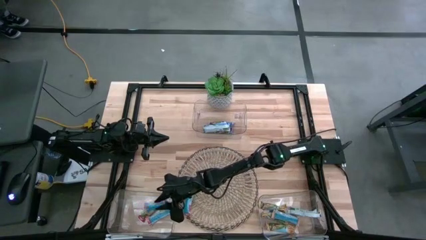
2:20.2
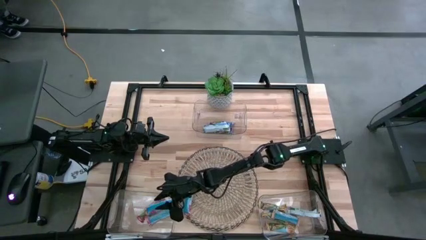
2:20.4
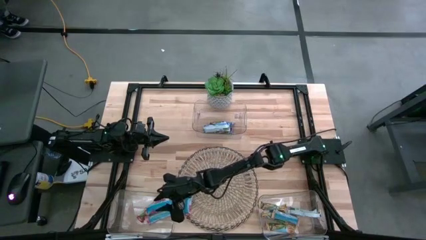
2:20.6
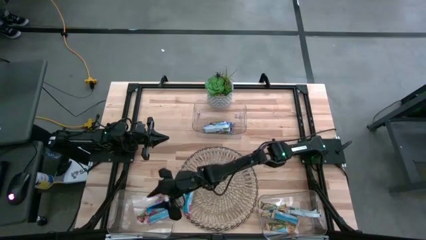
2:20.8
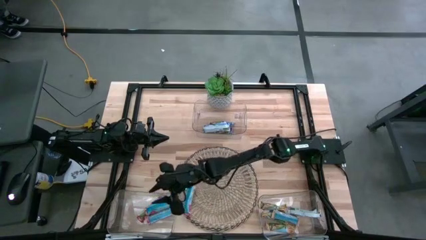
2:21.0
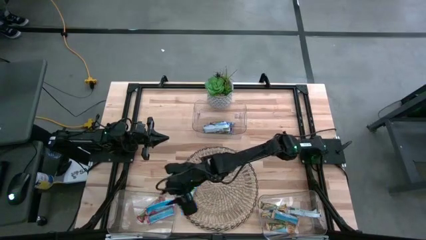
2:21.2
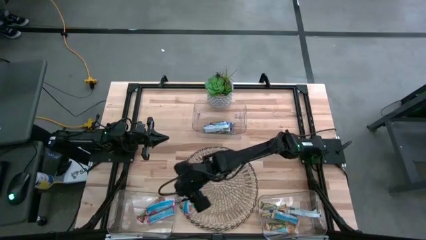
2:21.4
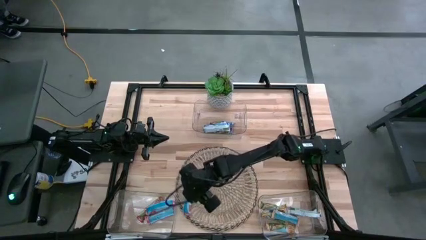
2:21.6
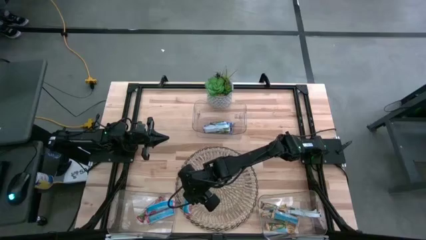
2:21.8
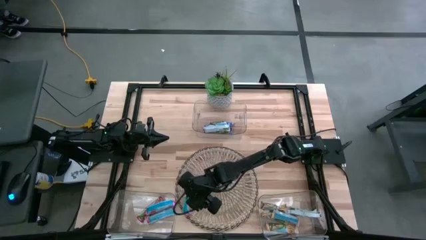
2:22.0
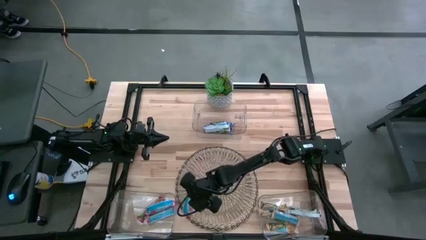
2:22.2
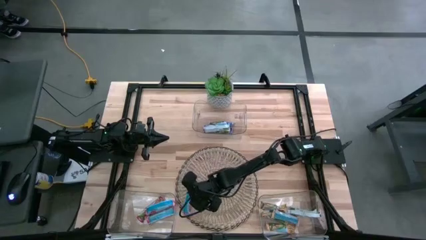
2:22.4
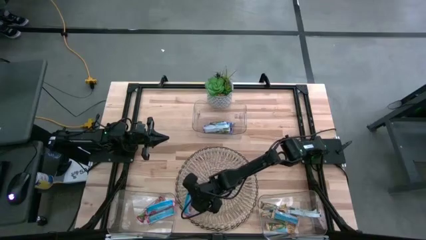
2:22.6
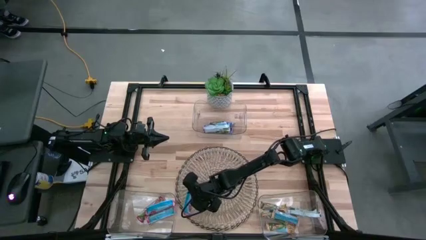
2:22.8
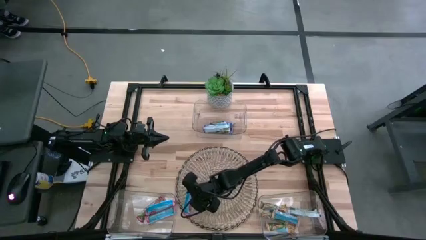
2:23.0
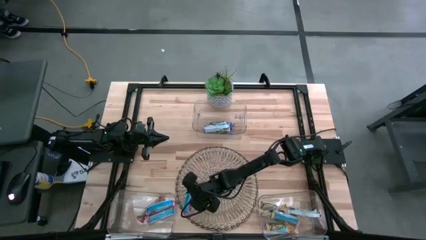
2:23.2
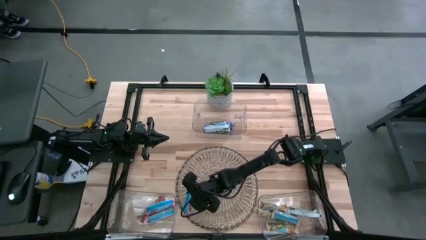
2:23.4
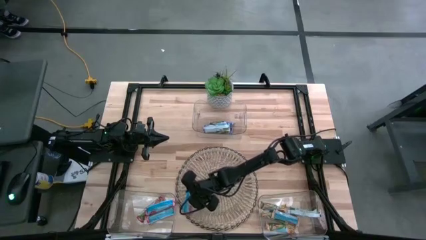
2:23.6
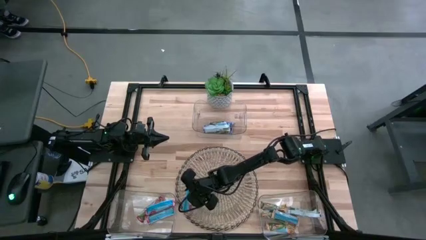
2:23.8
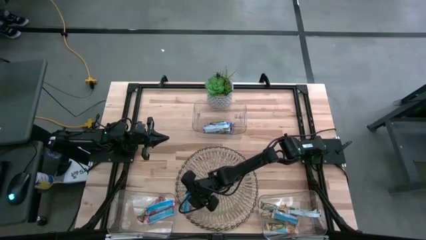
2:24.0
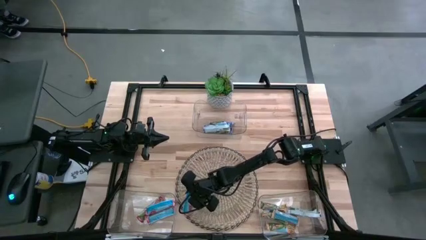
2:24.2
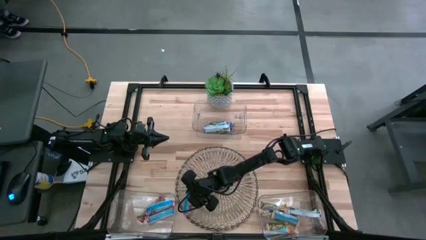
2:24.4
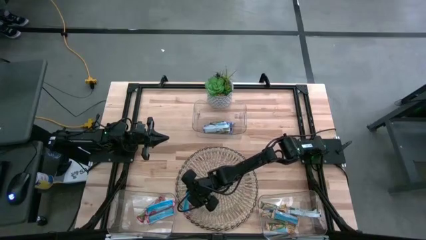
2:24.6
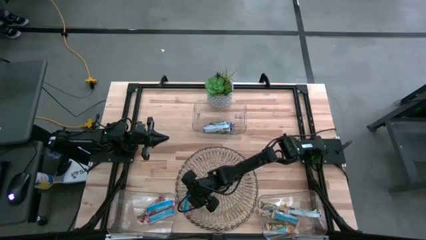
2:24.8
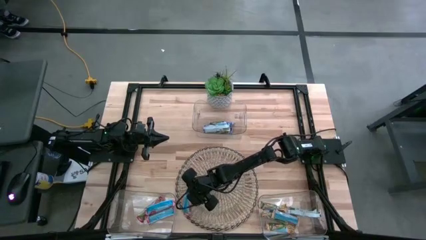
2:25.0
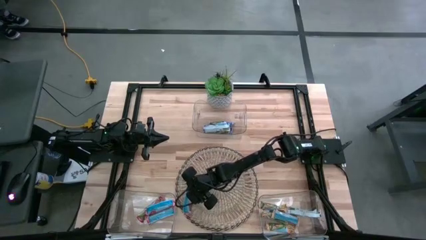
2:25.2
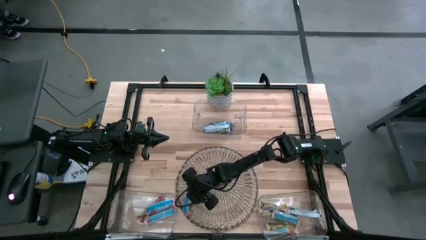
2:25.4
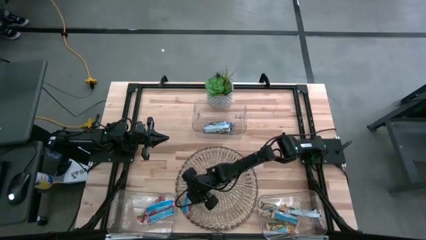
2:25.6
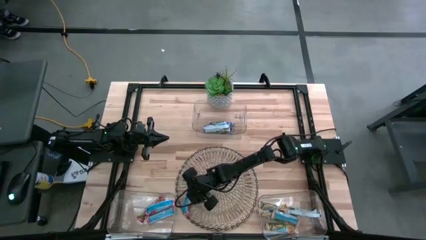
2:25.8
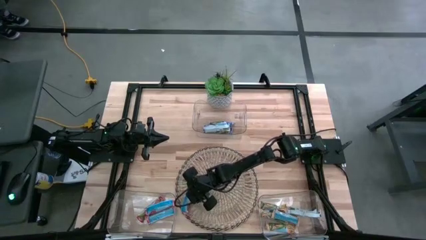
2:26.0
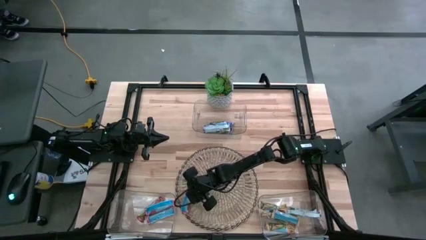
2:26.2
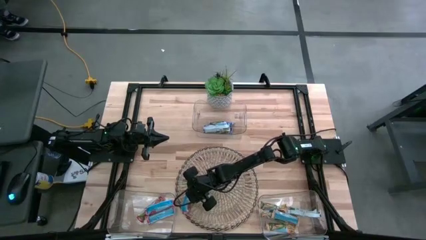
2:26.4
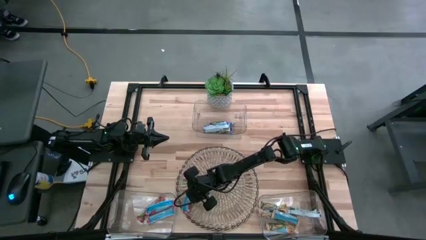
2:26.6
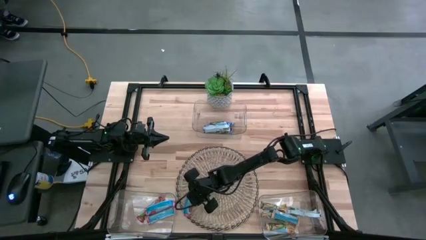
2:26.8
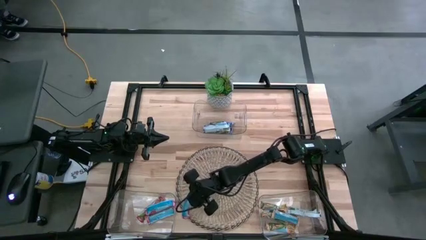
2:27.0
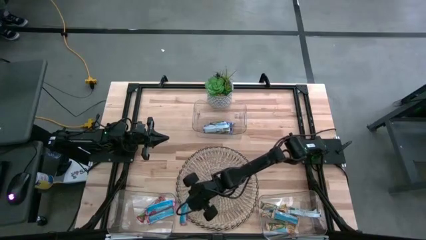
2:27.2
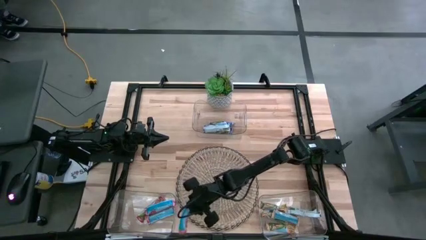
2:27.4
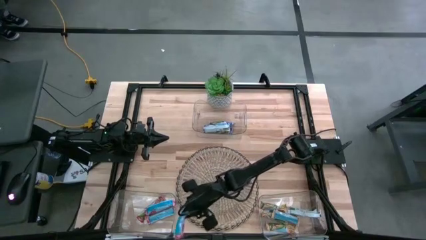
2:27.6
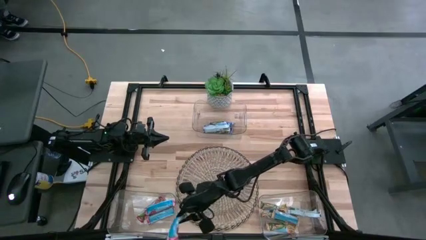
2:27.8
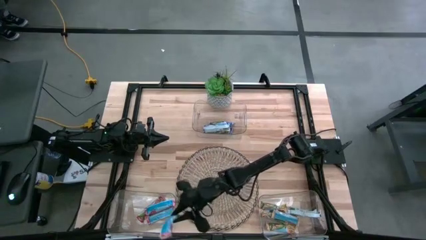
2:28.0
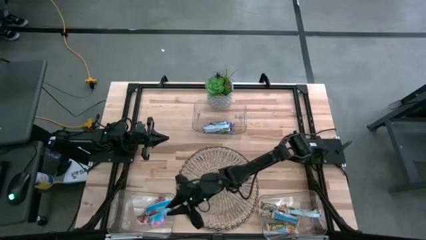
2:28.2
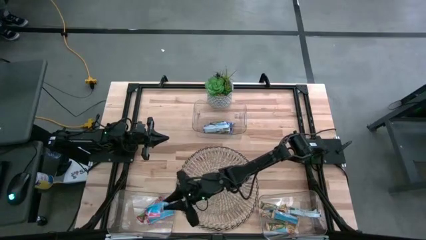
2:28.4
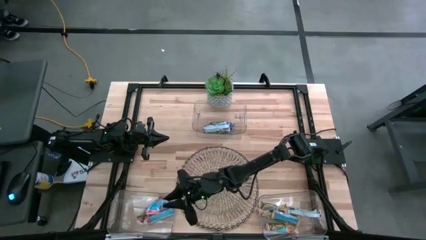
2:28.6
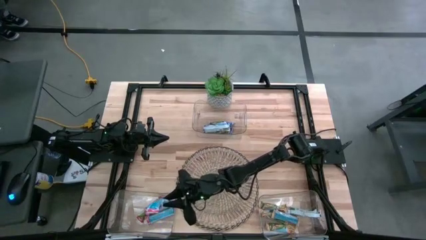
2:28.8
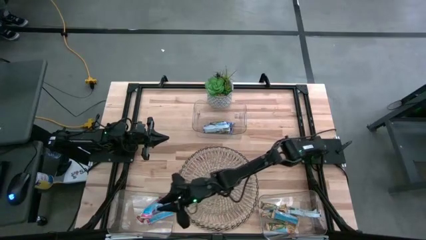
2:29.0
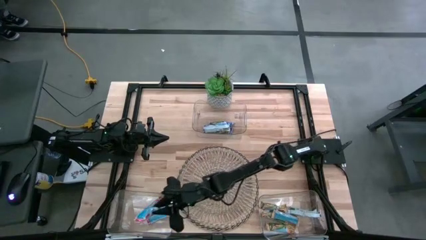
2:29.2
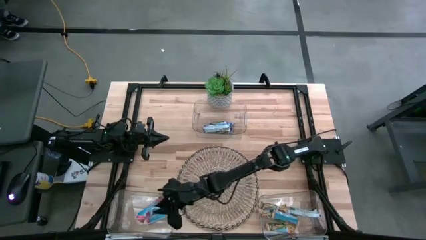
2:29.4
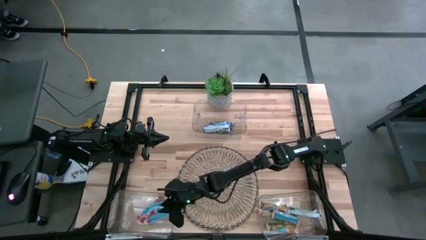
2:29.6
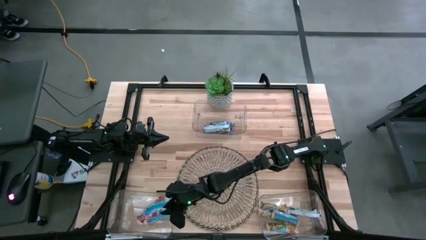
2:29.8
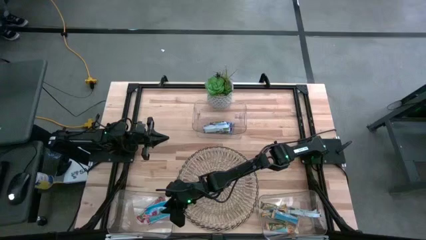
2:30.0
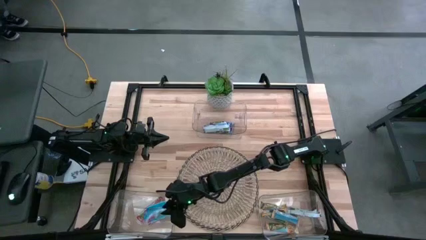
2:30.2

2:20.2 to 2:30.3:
Task: Pick and place Granola Bars by type
Put the red granola bar into the bottom left transparent bin

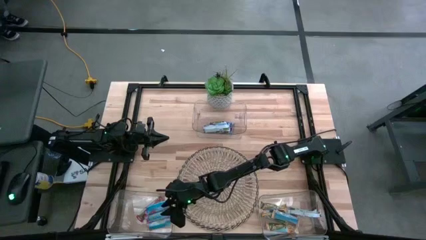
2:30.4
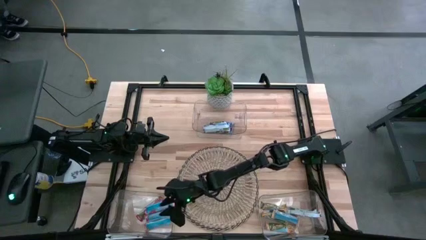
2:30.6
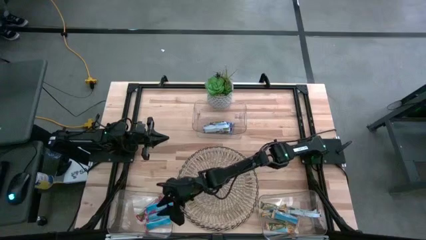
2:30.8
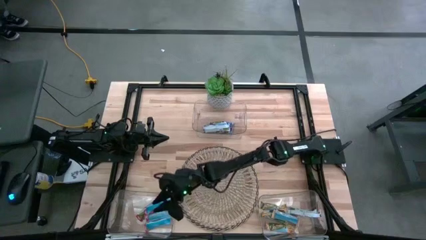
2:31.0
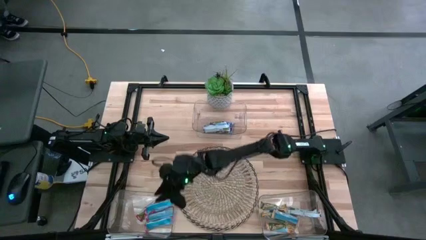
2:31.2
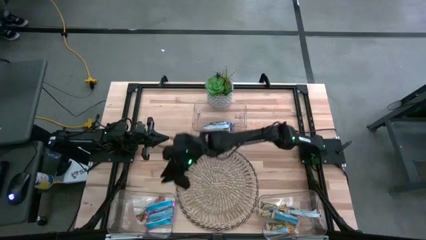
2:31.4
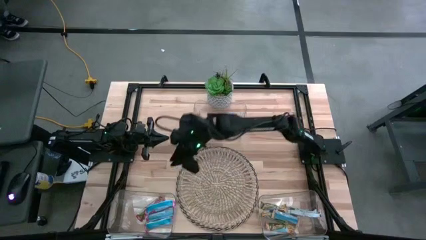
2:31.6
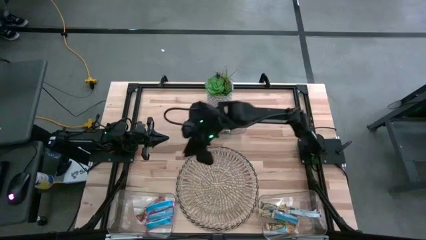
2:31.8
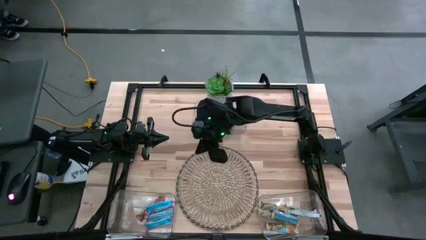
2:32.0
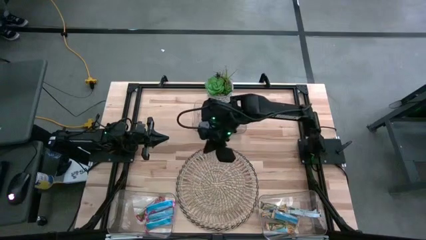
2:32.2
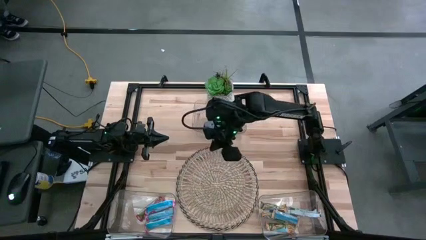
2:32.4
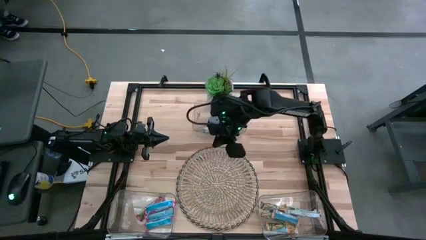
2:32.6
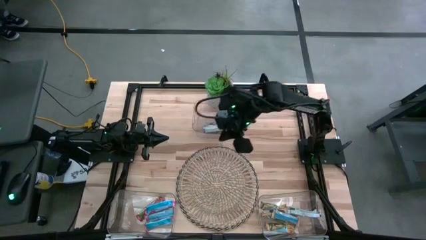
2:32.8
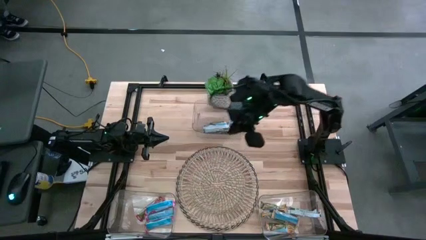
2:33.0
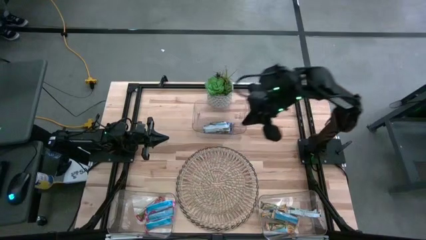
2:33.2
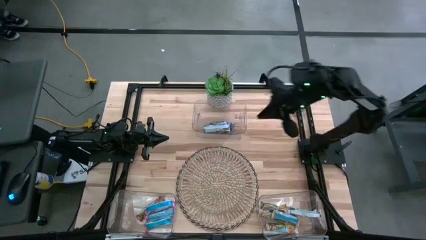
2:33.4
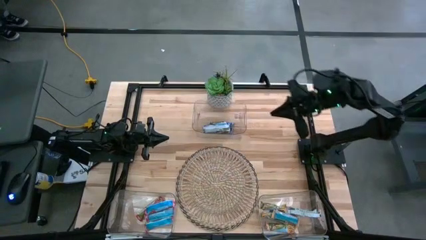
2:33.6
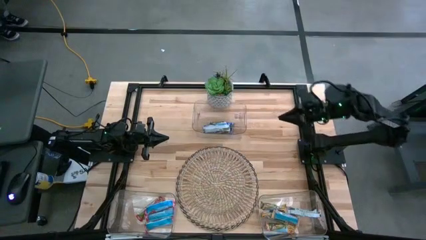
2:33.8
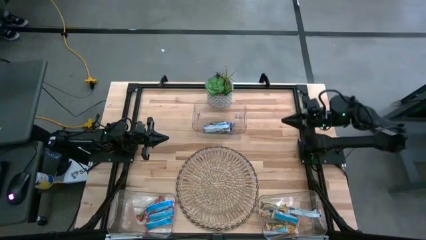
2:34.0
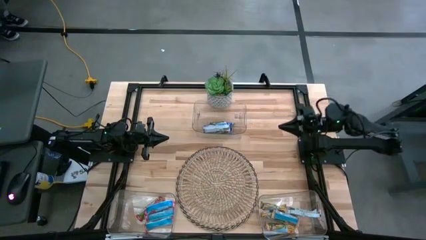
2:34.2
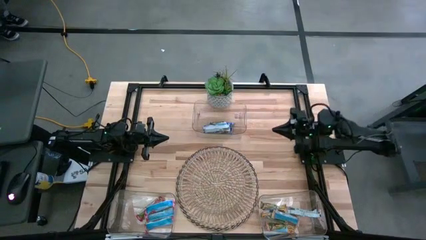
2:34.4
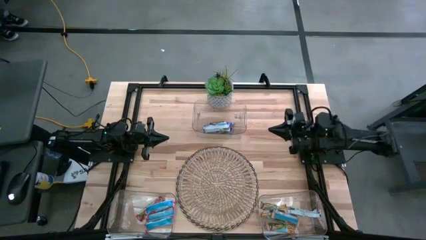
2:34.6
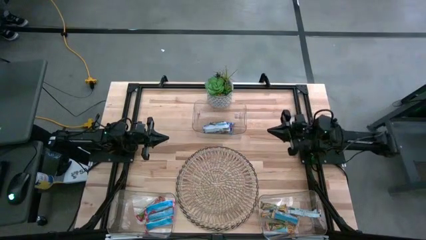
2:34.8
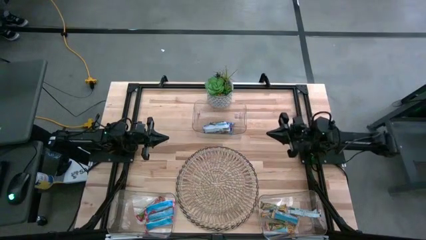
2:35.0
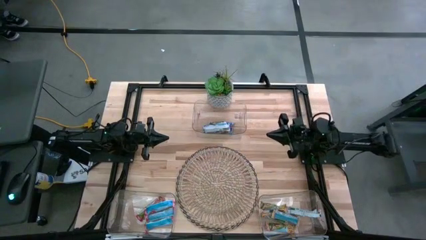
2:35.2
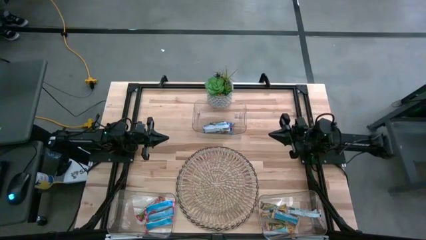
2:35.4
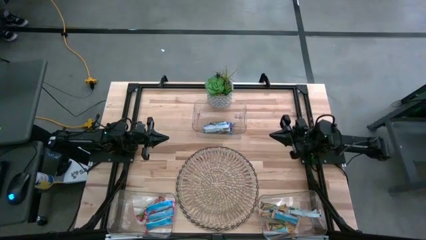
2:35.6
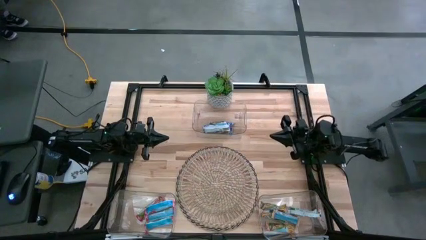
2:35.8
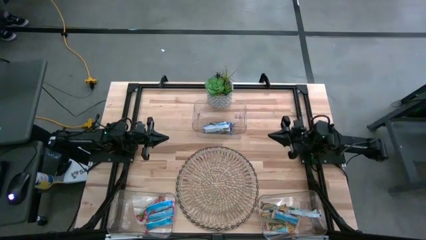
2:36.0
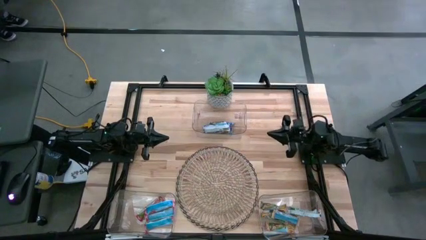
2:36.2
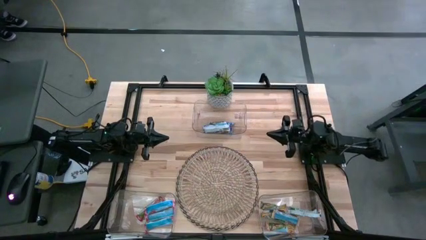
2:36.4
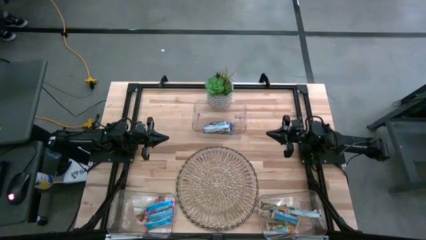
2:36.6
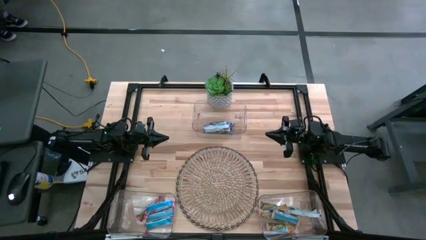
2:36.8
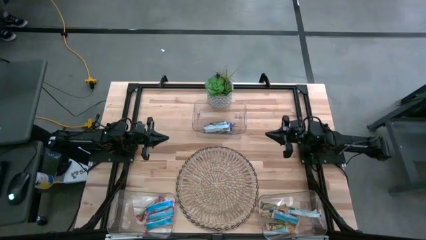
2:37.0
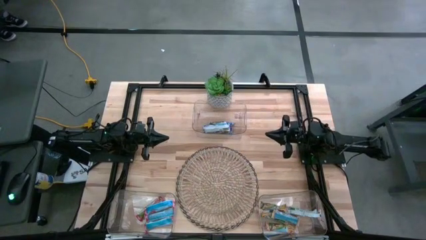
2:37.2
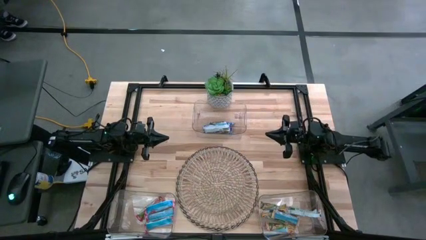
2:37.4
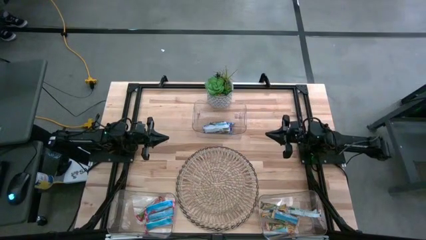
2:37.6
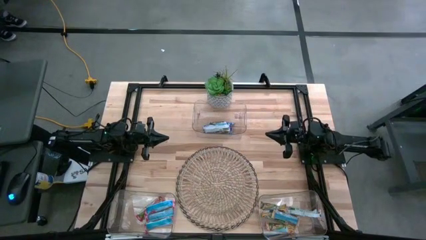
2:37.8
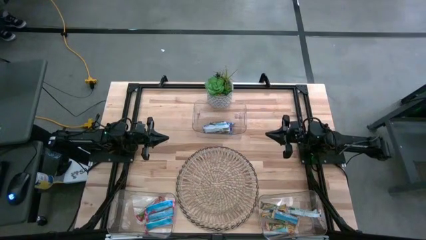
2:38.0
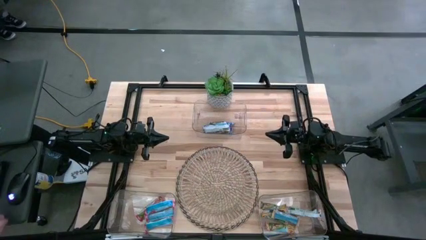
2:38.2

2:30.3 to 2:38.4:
Return to Home Position
